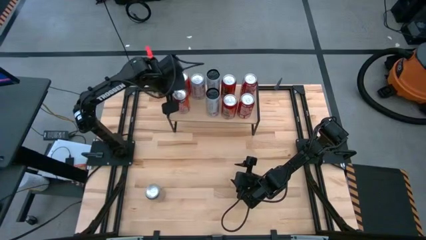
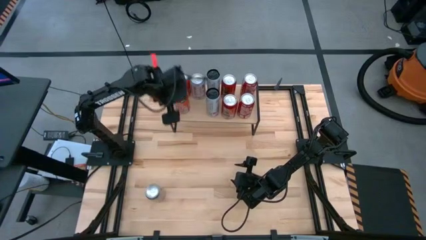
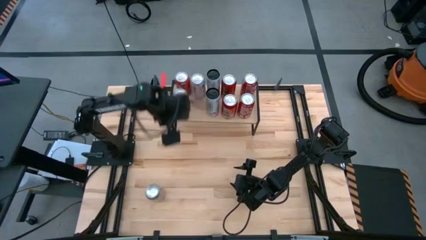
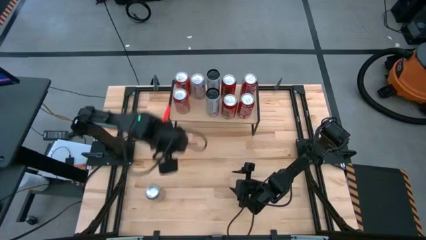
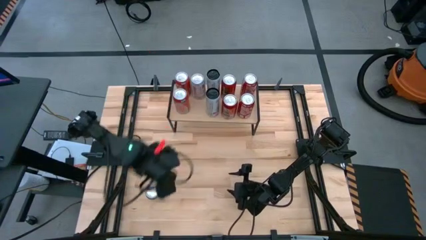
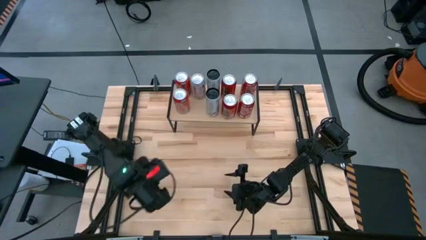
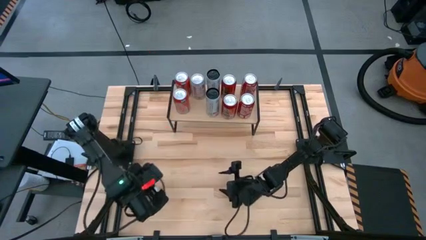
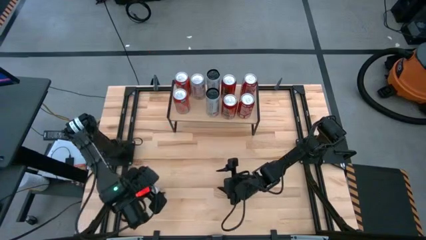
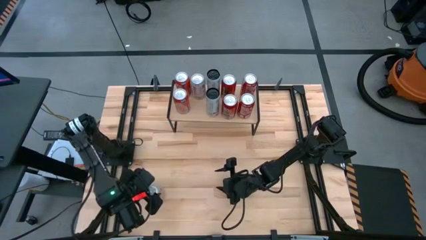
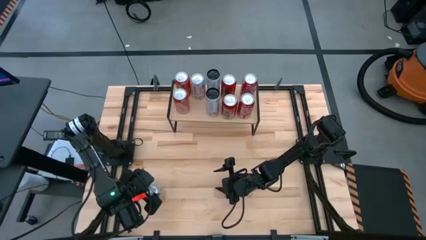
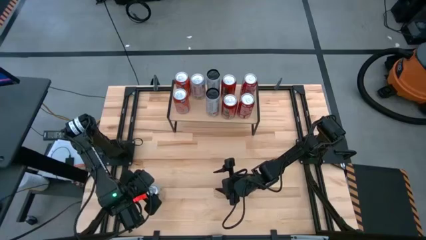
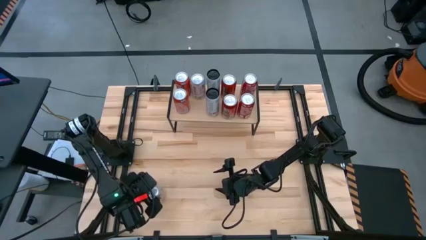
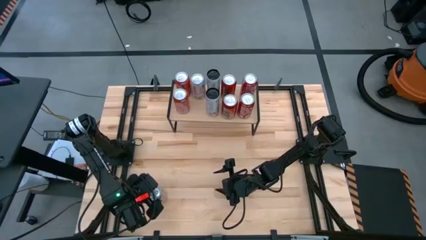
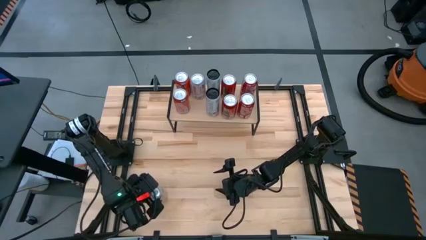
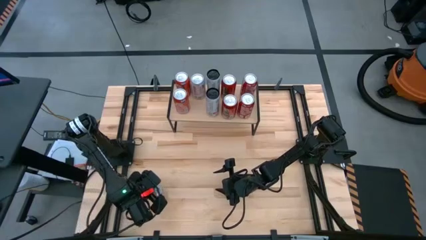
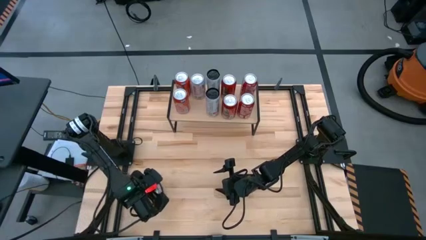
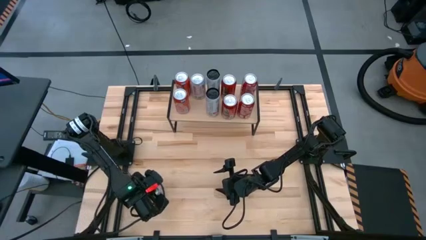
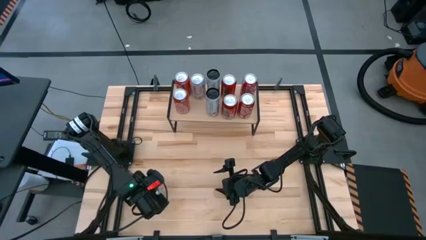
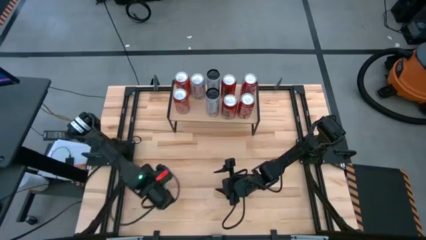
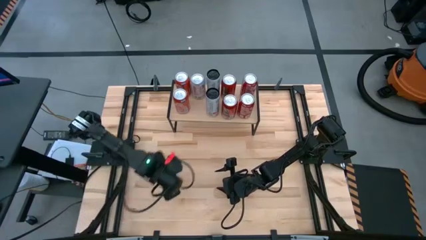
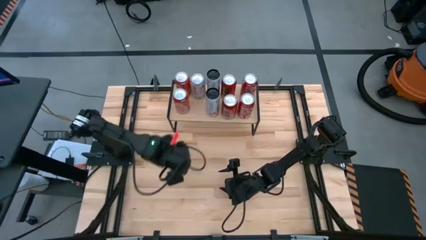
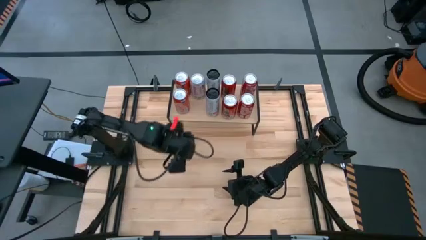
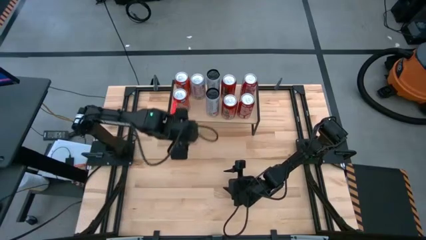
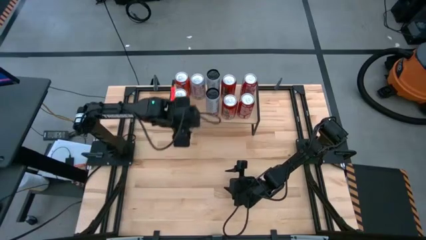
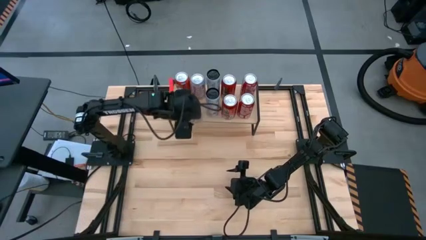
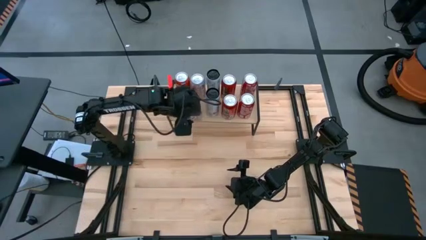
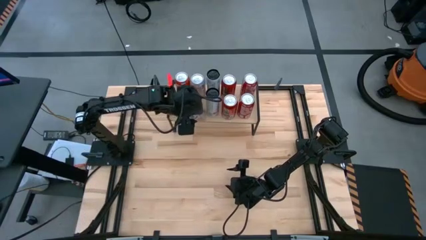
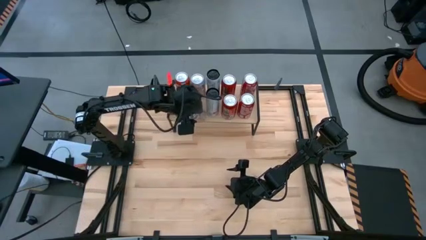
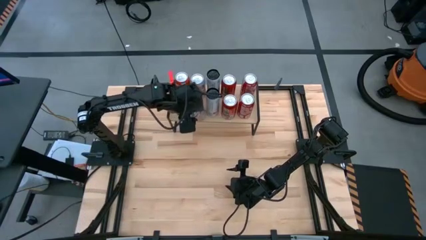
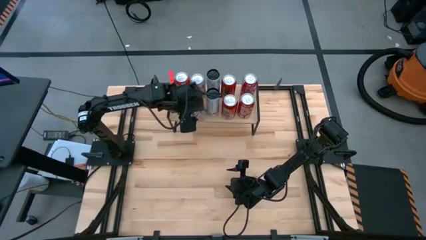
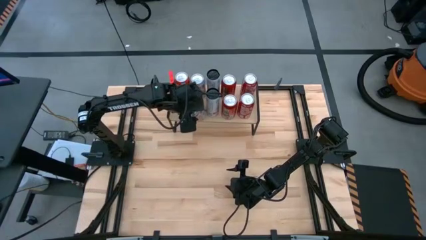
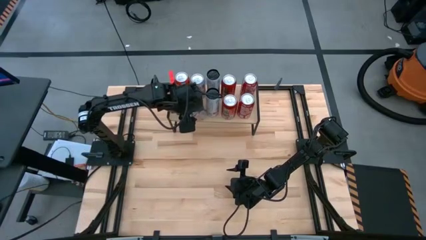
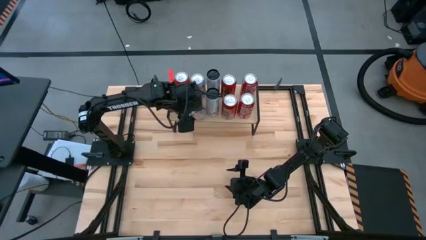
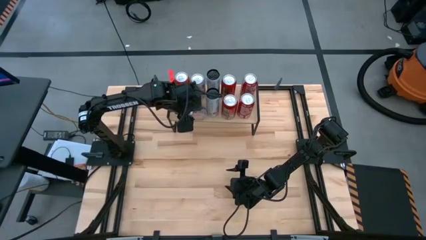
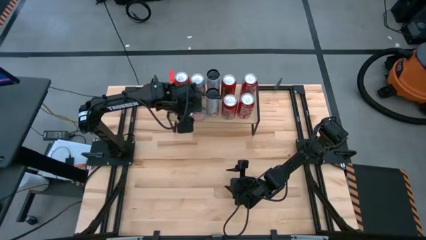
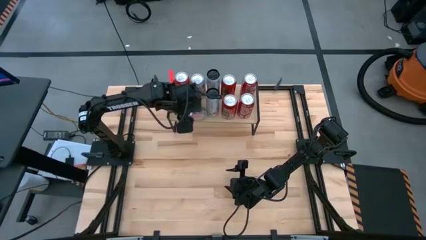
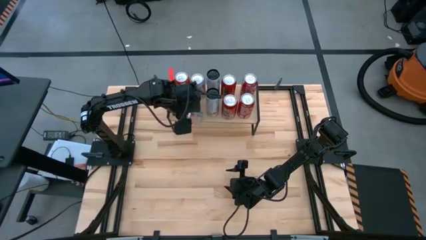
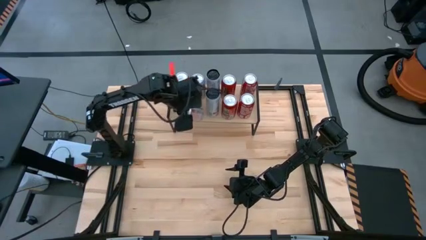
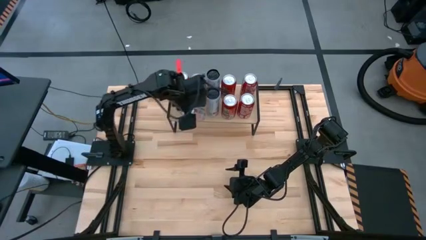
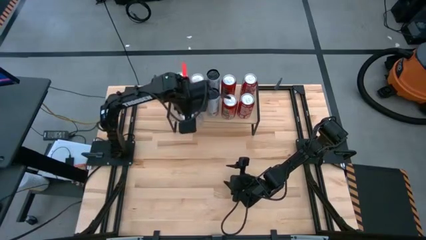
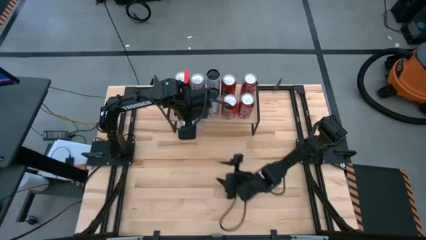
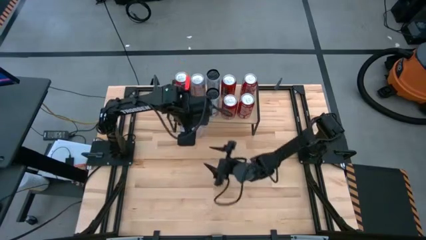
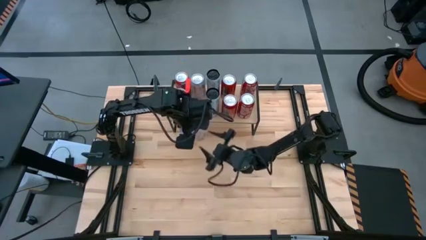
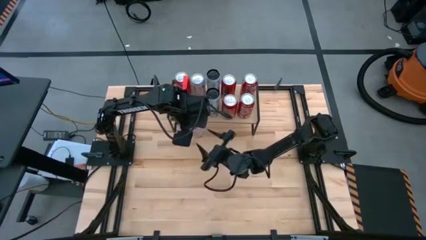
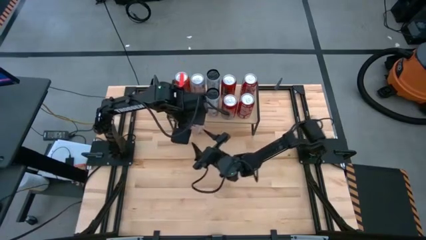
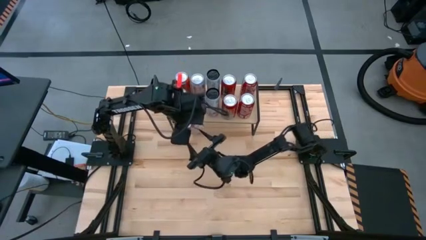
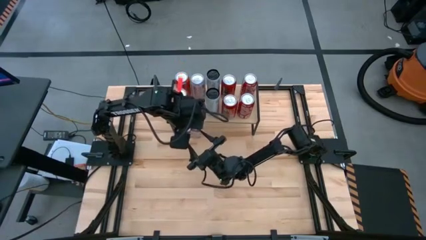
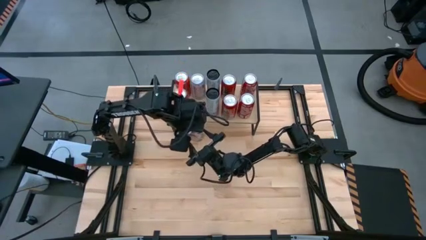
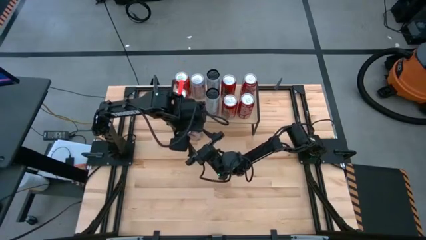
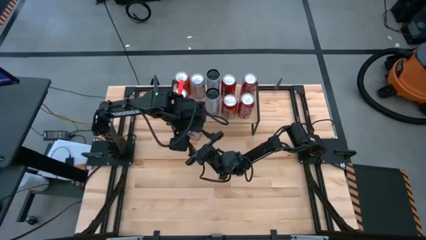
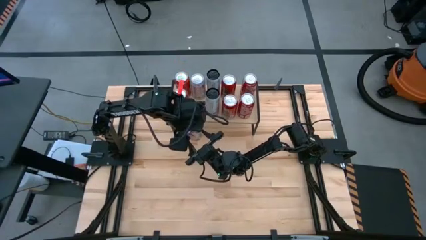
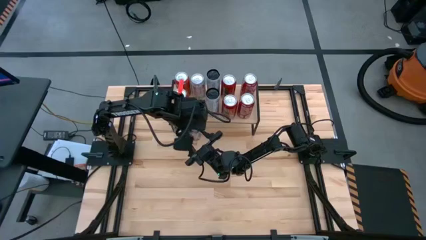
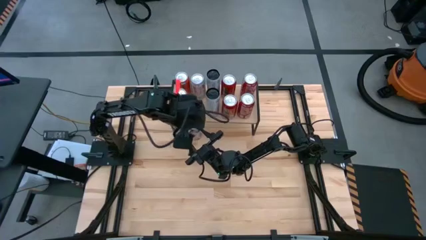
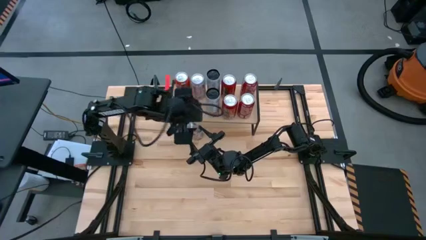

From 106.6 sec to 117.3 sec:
Task: Place canned beverage on shelf
Put the silver soda can on the shelf

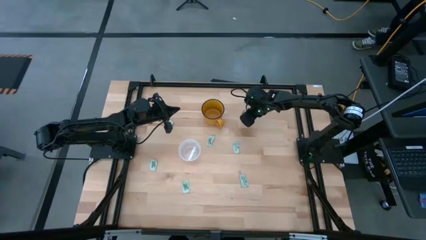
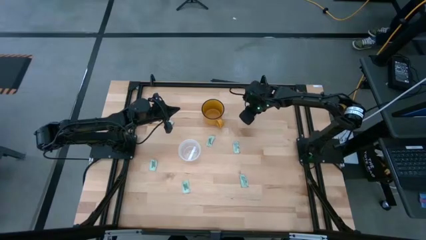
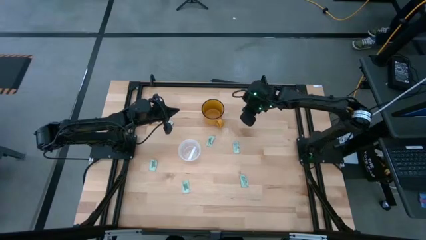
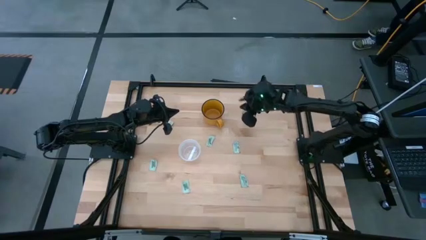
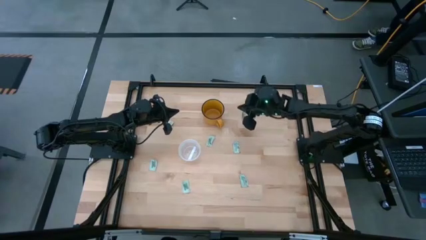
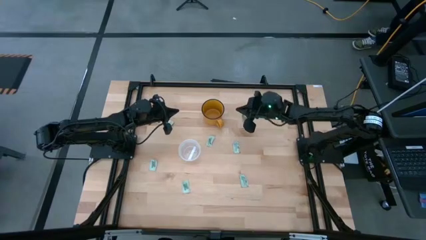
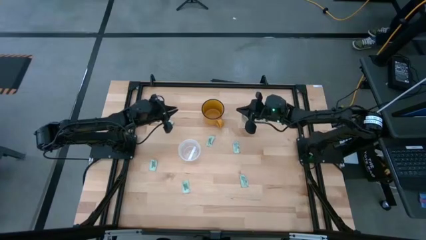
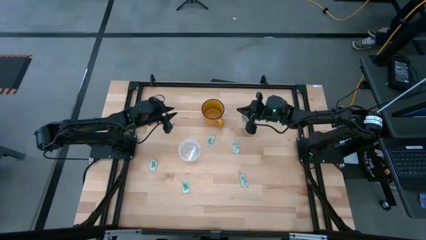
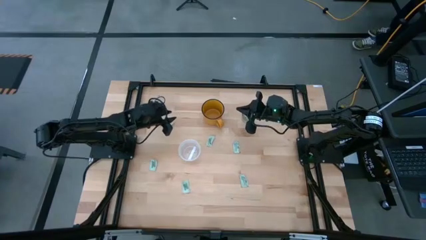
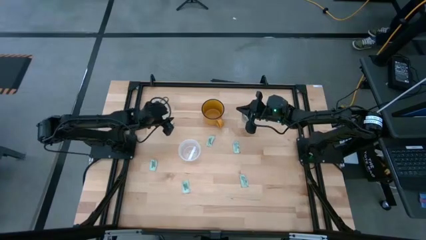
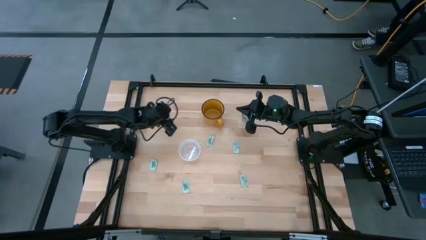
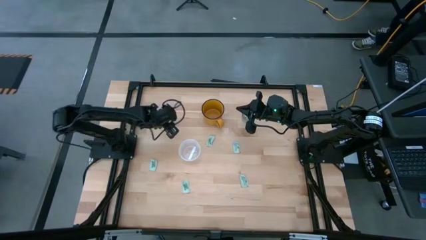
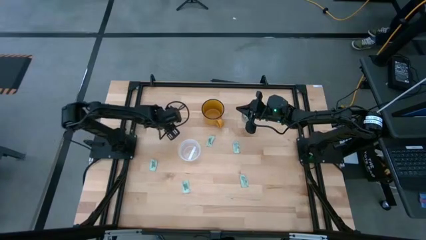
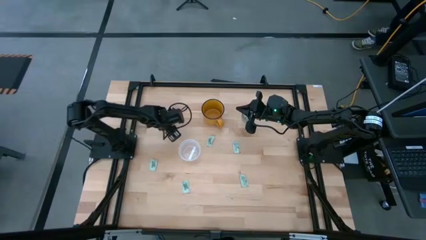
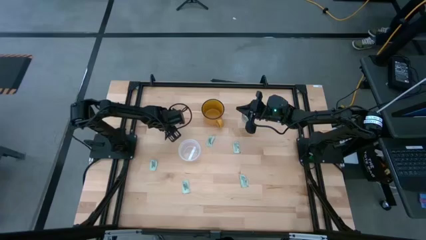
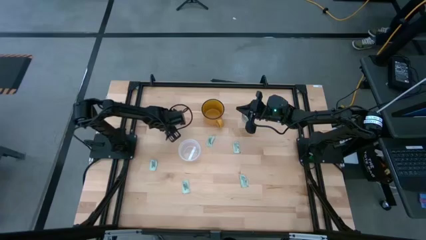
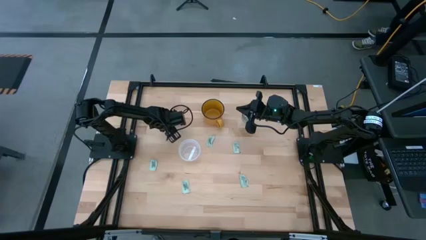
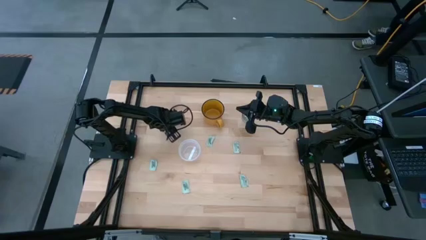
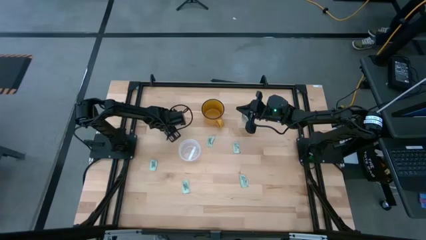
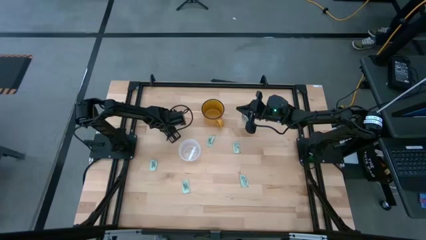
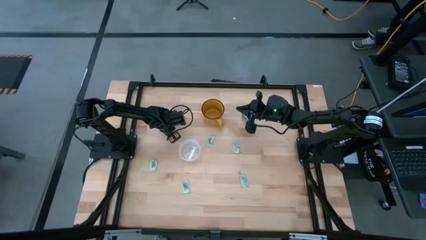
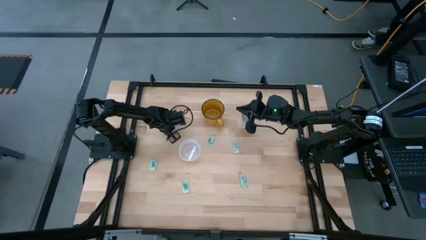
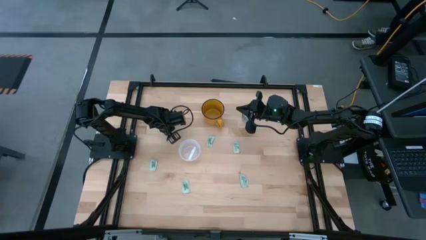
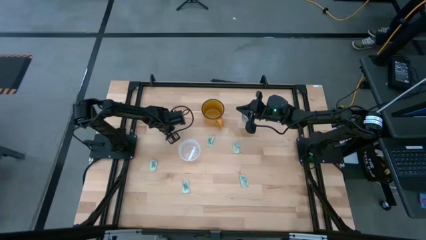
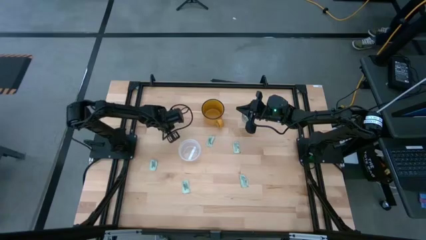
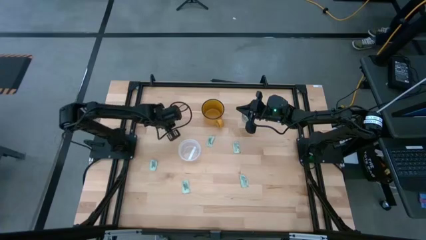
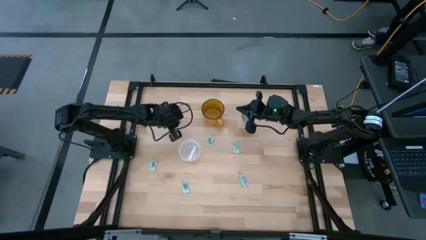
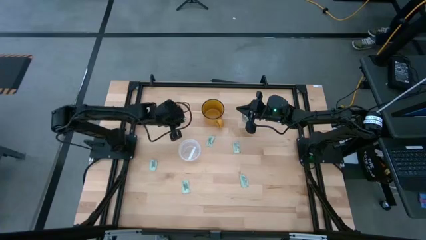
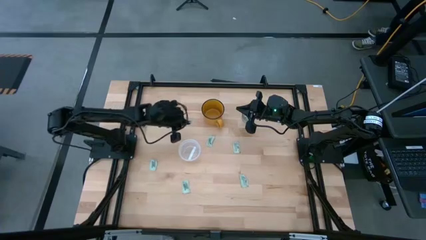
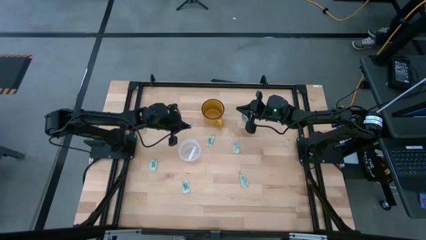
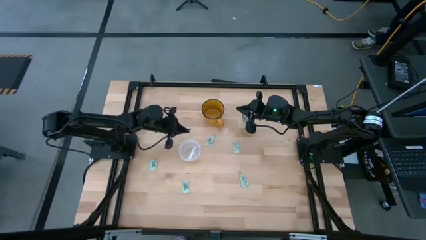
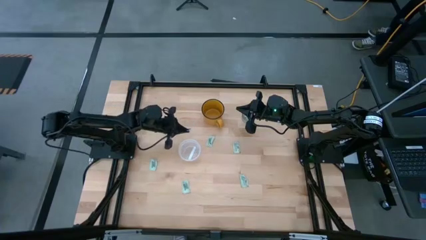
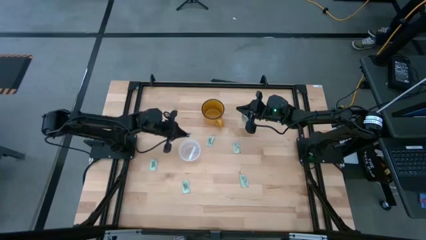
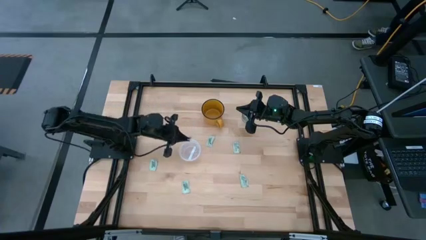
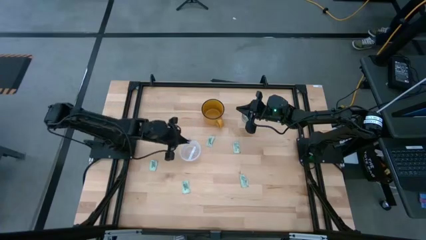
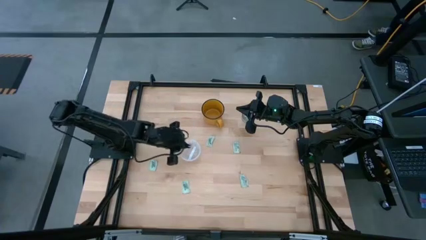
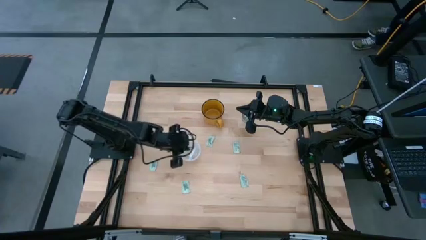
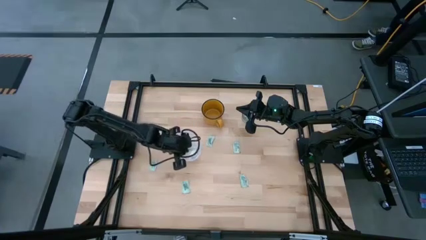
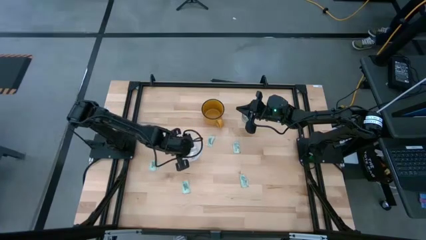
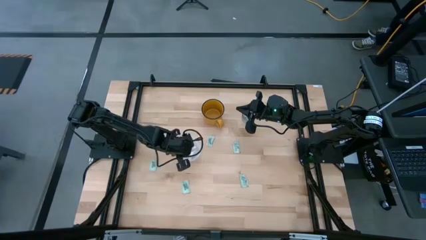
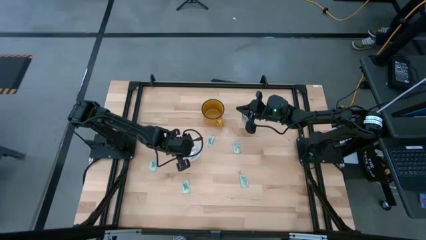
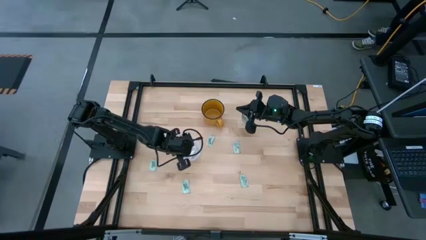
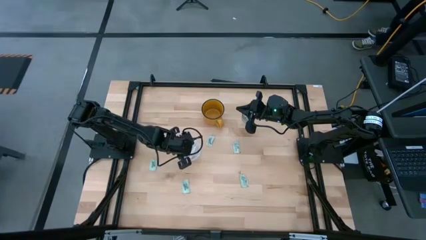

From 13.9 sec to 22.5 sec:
Task: Pick and place Stevia / Truvia into bins
Put the stevia packet into the transparent container
